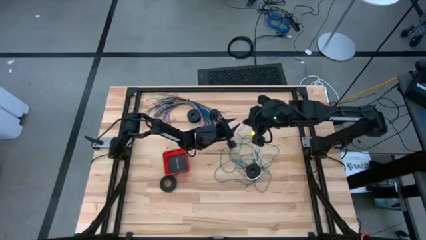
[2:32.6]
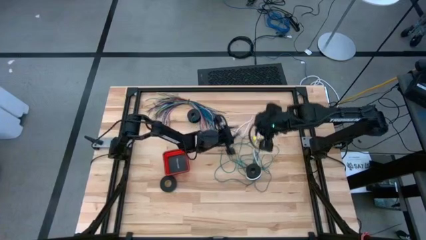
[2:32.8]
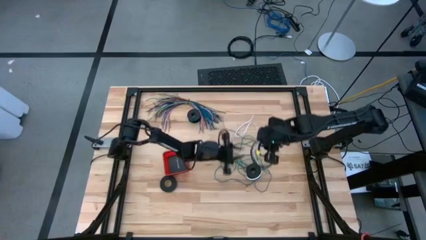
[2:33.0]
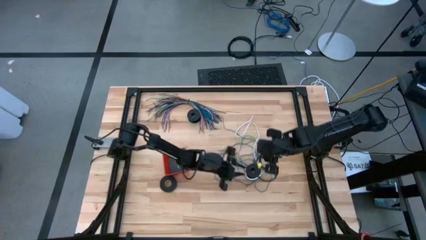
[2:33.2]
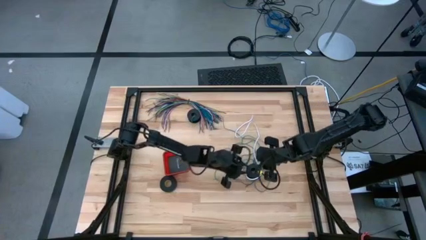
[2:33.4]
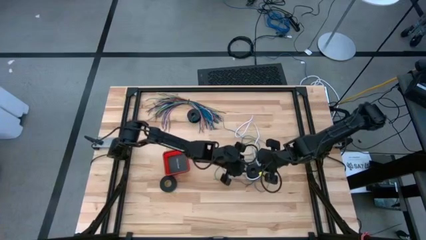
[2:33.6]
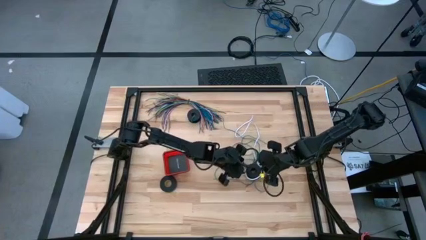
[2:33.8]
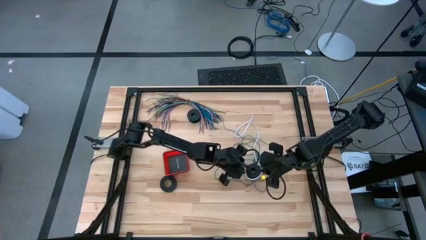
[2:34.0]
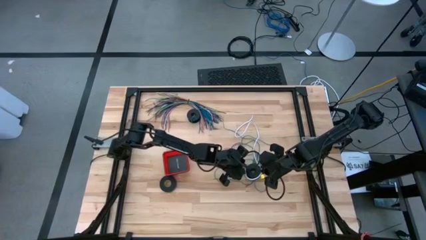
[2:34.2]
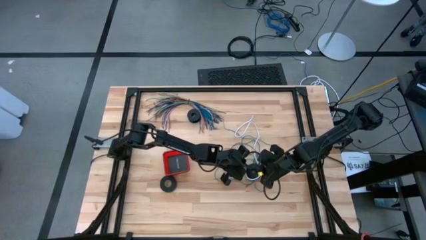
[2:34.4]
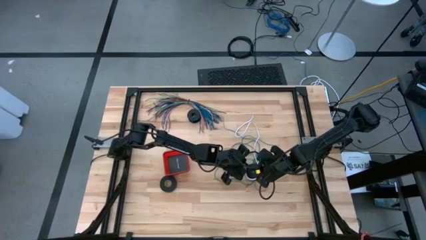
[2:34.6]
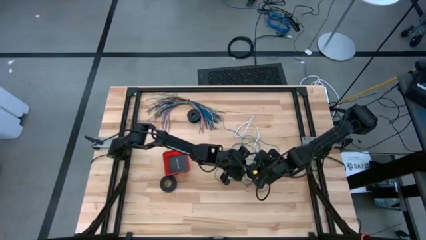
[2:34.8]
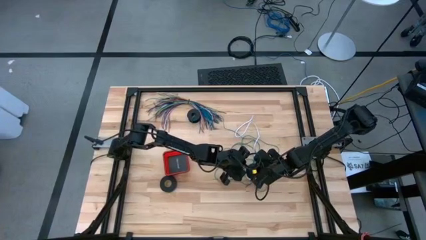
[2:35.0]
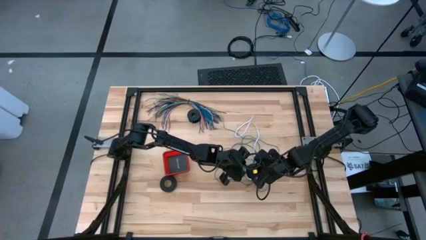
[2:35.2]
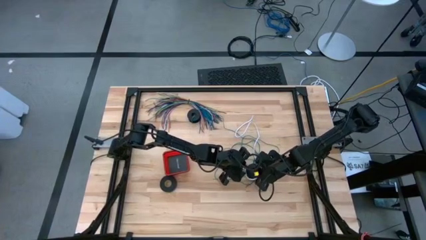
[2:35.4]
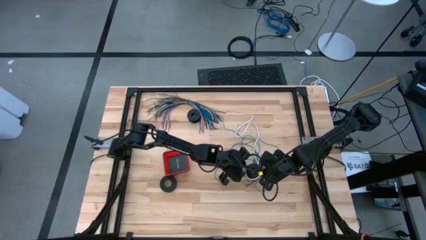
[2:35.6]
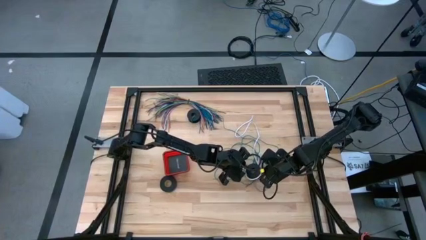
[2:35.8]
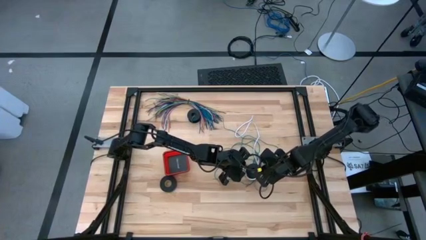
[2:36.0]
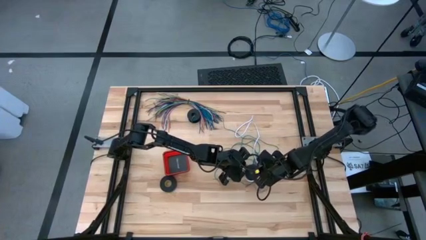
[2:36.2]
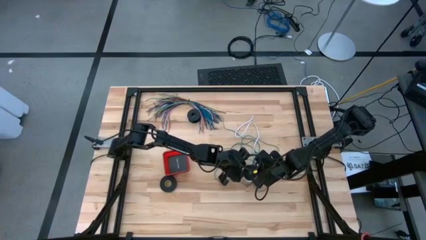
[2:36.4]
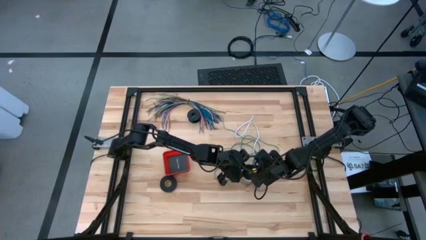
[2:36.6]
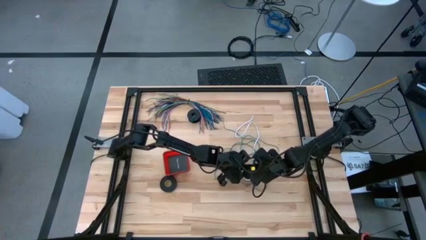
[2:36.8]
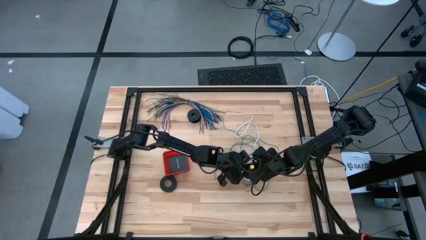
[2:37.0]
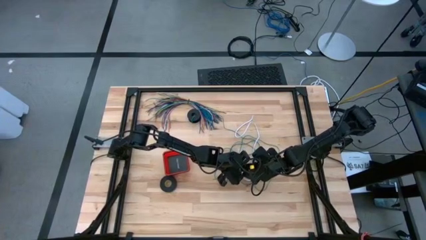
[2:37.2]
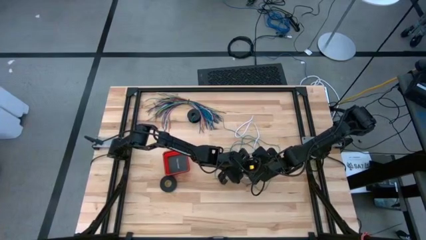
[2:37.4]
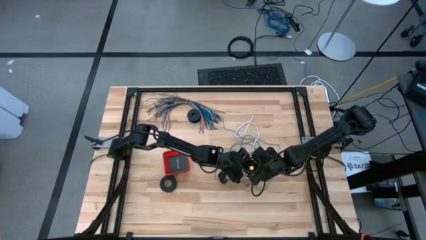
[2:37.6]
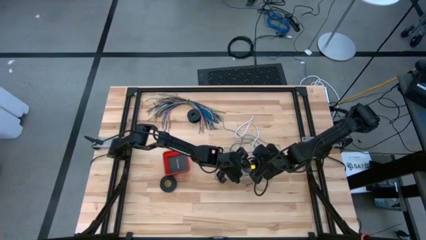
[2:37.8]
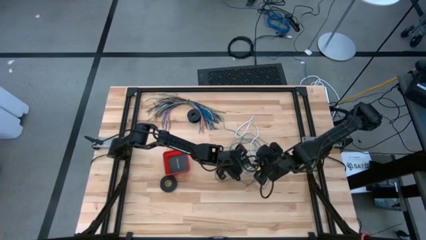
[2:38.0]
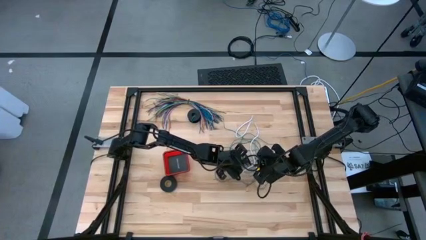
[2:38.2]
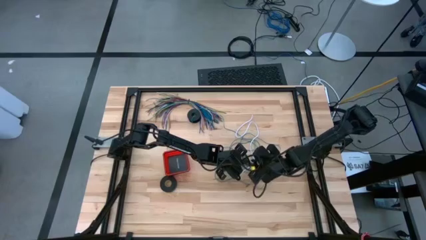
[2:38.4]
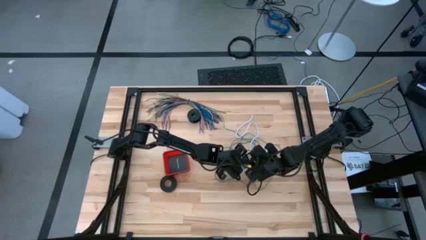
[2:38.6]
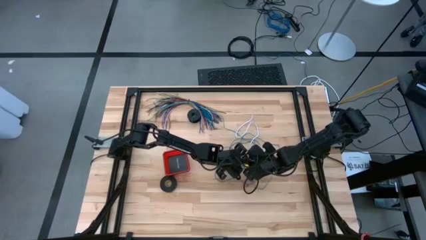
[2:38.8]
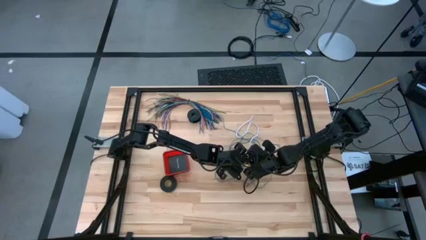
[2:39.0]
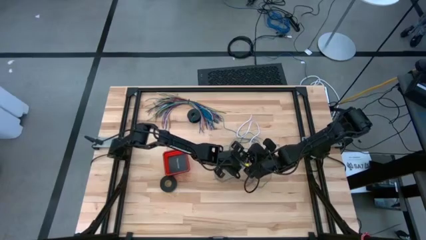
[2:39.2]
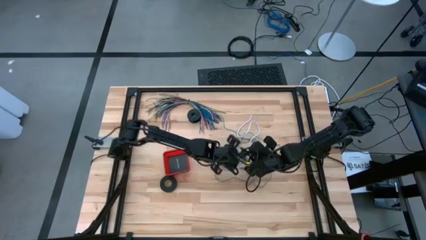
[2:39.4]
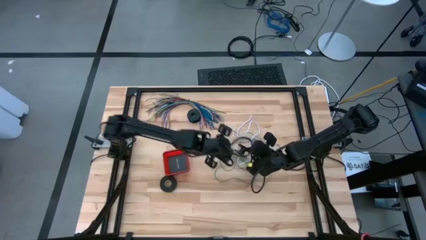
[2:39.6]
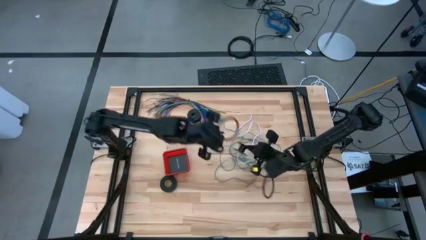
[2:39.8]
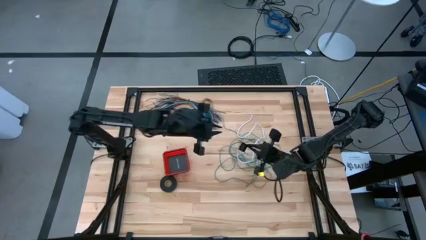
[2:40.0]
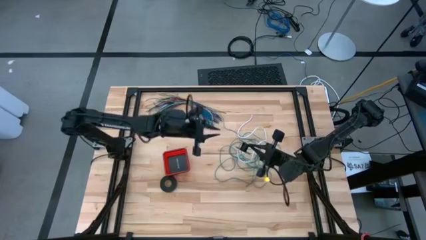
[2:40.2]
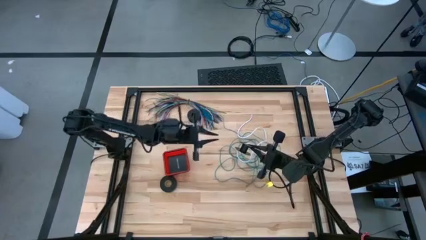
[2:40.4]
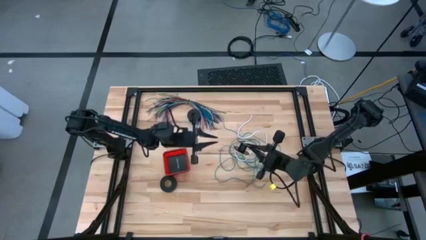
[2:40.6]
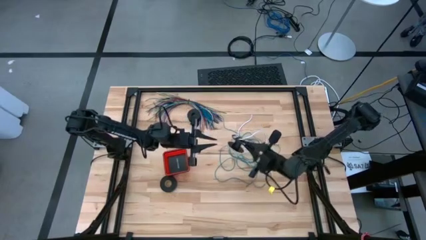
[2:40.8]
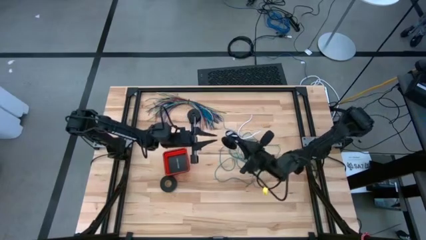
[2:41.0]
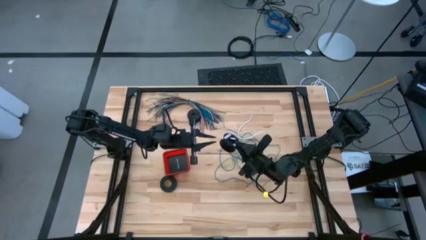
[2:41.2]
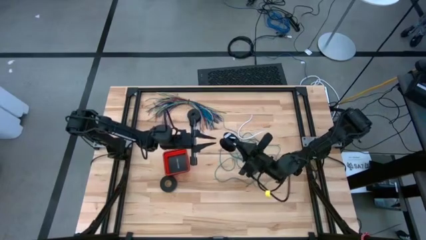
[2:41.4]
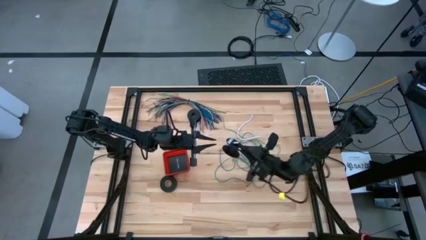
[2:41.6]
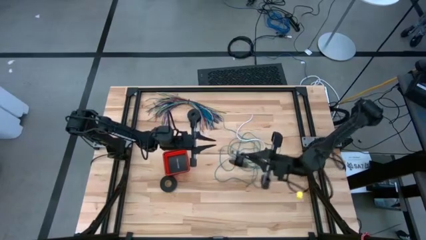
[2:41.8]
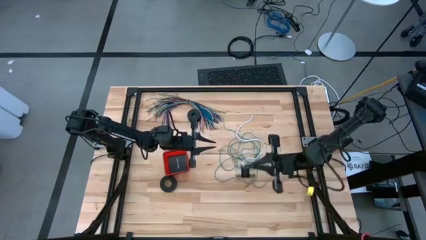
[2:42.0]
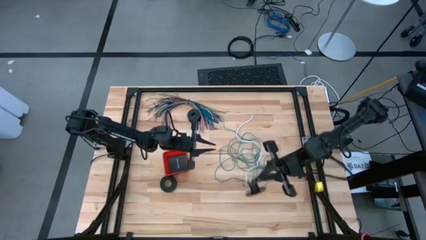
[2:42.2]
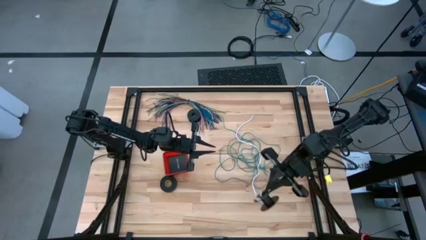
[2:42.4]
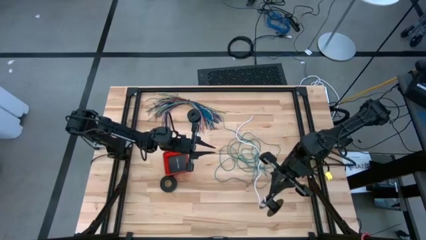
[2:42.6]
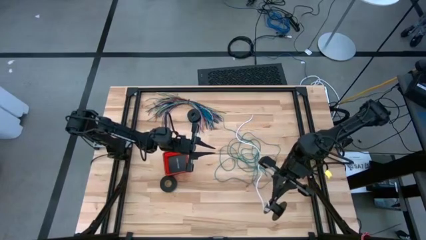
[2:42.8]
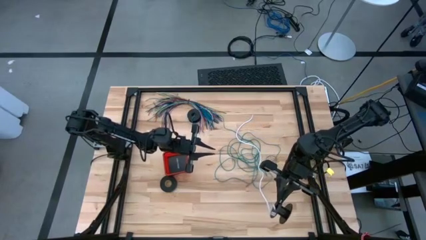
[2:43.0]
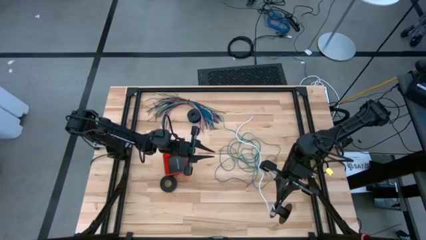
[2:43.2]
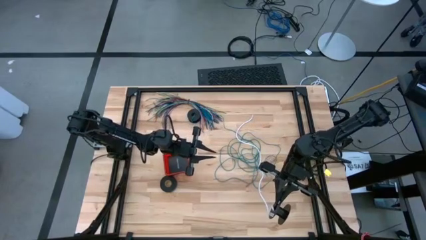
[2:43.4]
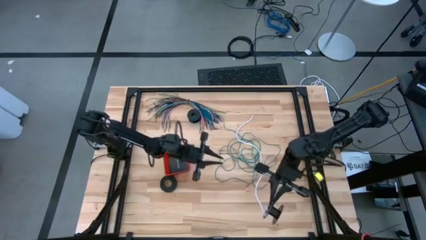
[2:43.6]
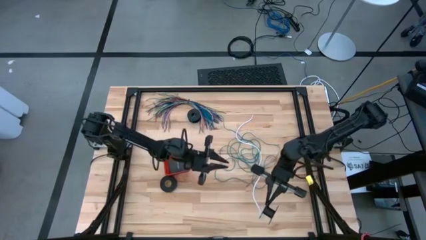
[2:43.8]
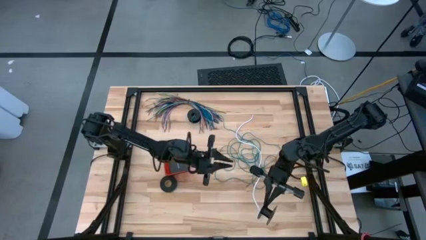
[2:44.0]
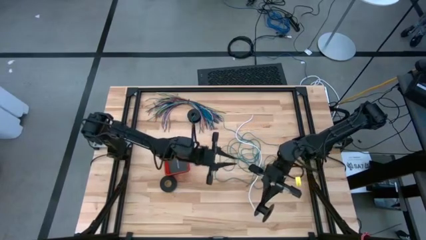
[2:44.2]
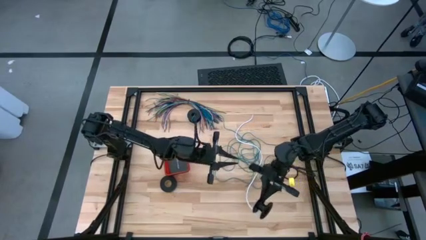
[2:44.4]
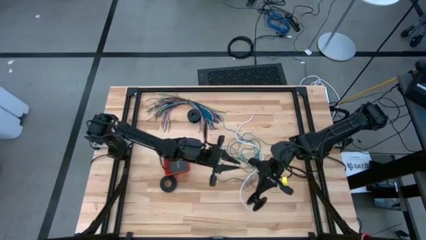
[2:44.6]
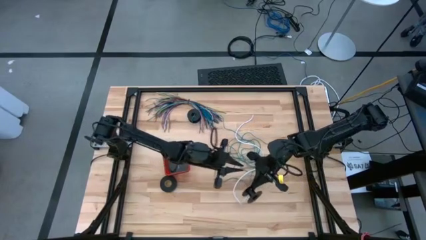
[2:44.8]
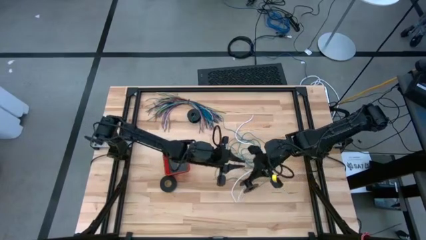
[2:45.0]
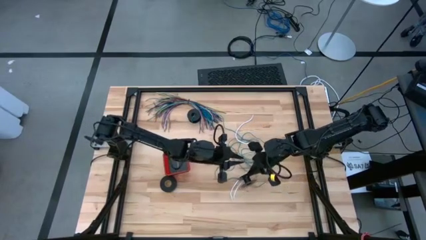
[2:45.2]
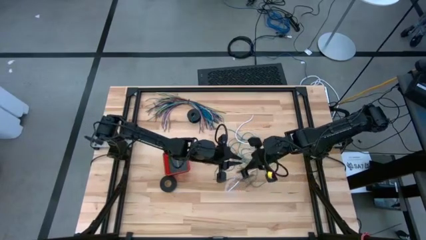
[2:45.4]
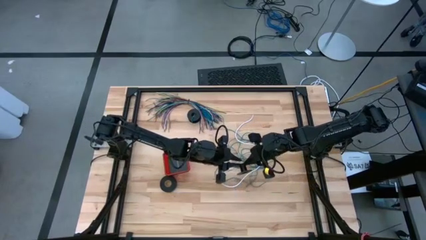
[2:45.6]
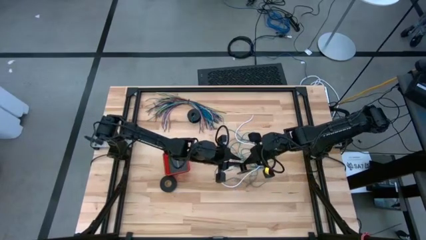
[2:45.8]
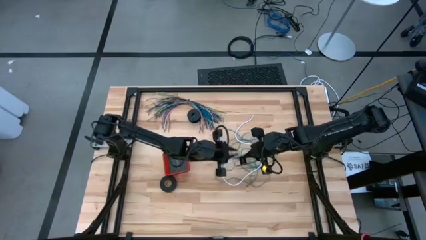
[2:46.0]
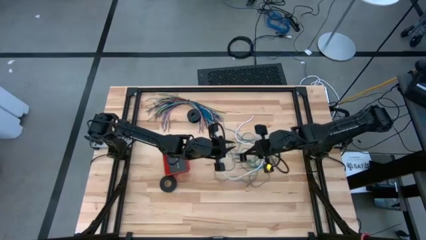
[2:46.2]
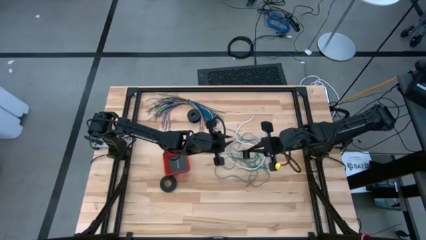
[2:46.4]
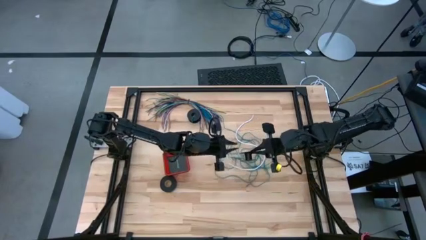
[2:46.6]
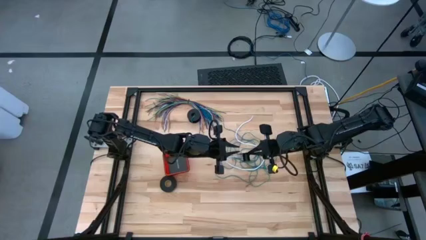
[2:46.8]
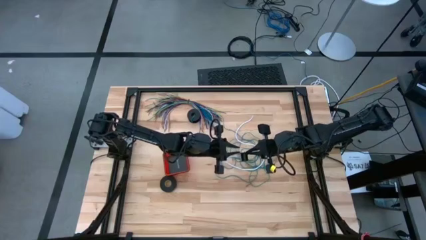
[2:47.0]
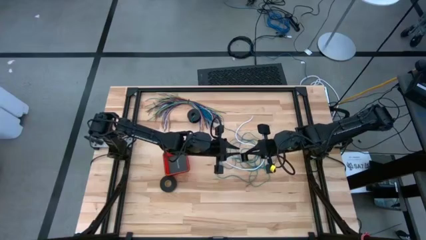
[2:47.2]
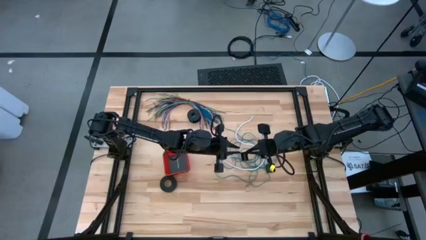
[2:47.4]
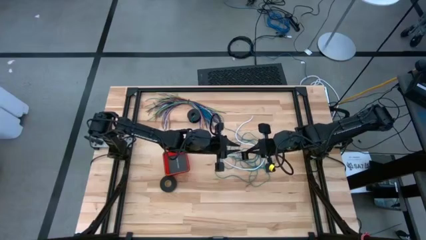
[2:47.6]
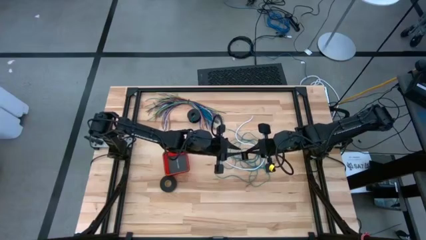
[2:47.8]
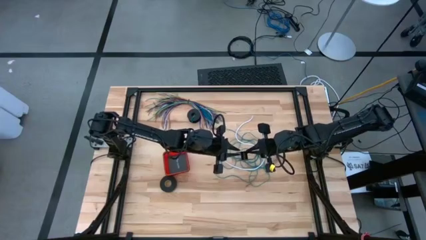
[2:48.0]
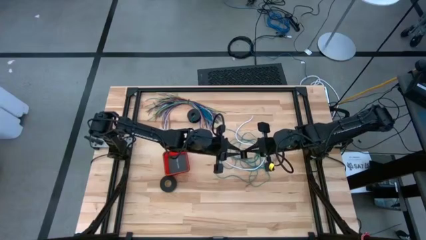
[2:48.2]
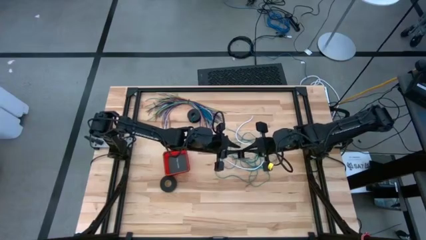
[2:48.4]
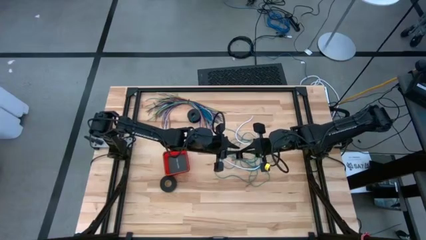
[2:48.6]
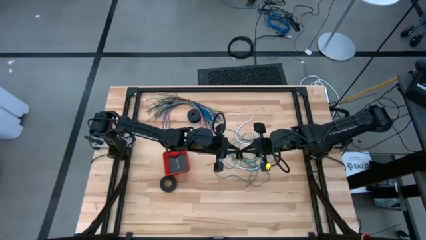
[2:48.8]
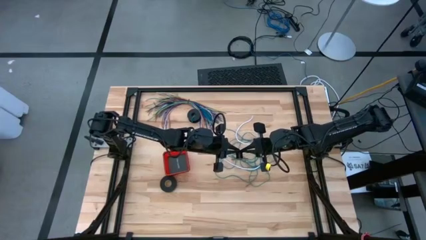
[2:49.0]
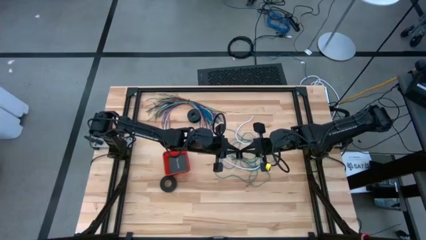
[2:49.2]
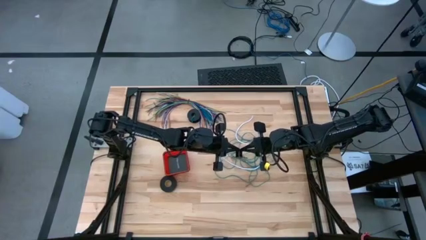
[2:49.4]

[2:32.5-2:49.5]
Task: Coil cords
Coil the white wire onto the spool
